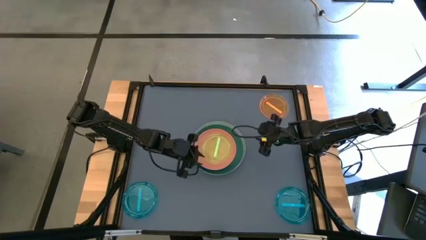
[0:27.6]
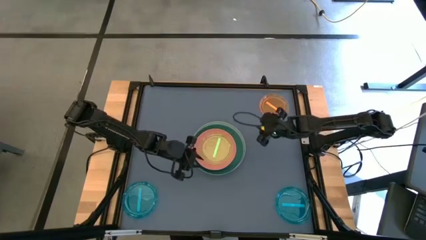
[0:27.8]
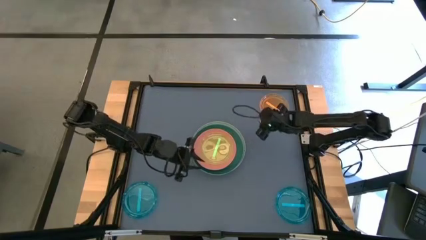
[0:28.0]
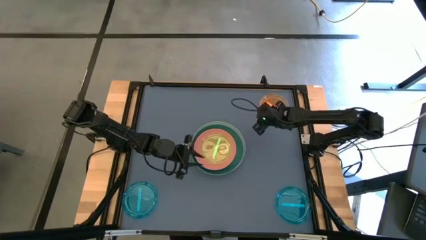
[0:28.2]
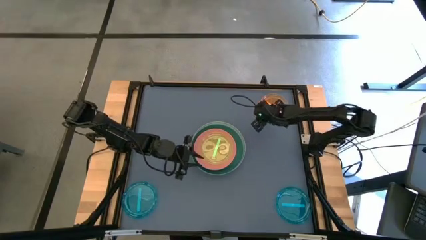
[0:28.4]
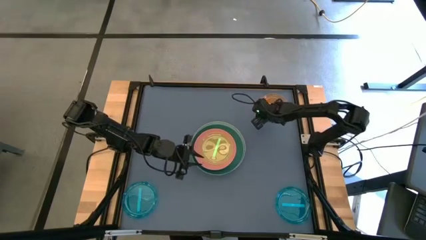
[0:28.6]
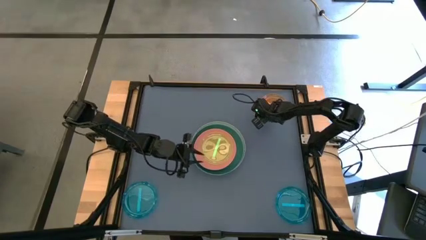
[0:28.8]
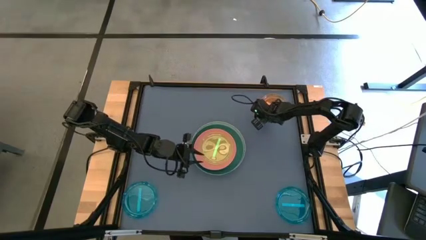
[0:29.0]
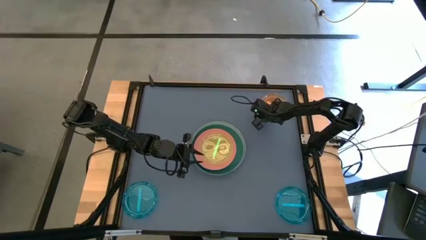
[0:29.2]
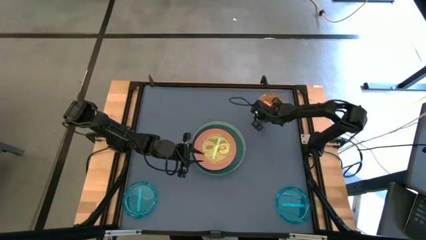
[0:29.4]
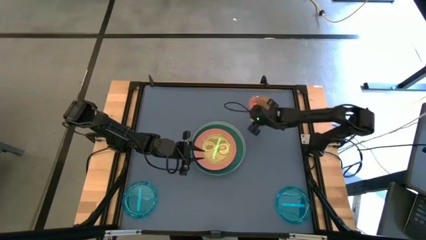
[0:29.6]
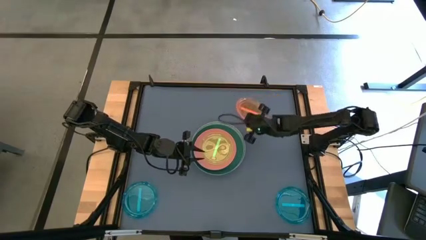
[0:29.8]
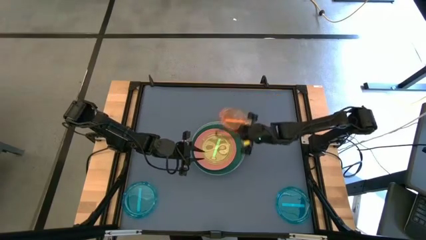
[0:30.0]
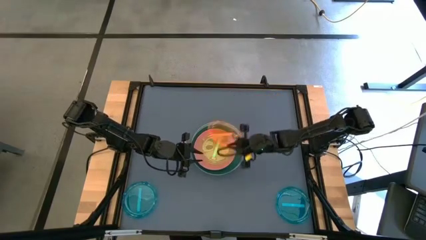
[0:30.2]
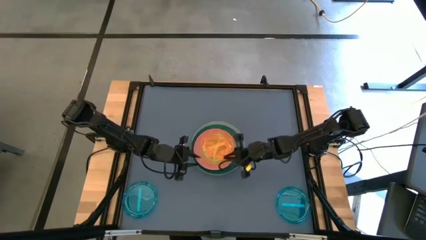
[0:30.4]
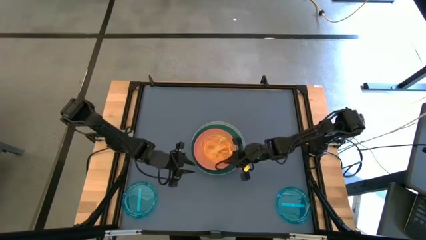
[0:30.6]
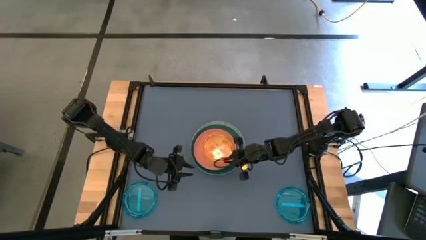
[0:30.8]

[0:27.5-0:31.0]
Task: Stack plastic plates
Stack the orange transparent plate on the green transparent plate

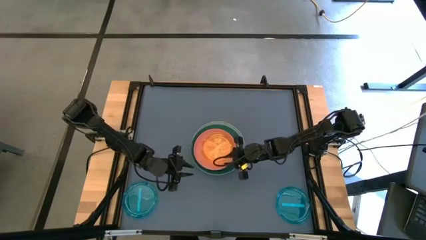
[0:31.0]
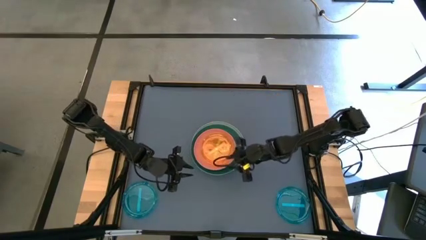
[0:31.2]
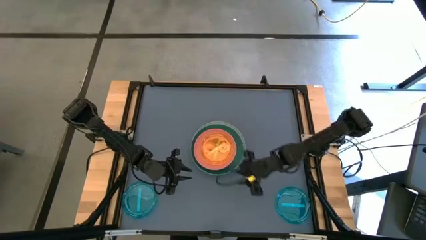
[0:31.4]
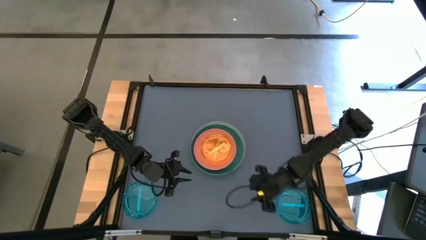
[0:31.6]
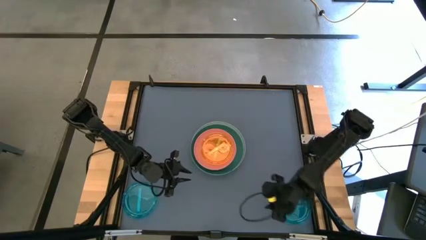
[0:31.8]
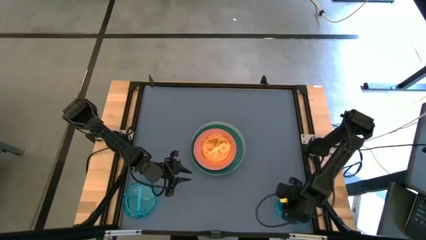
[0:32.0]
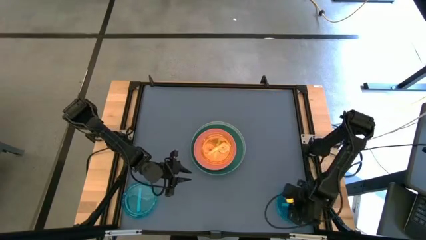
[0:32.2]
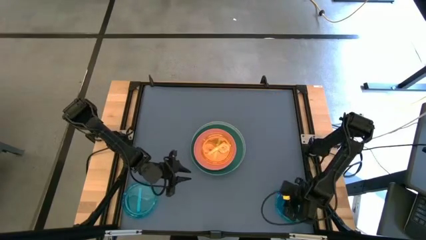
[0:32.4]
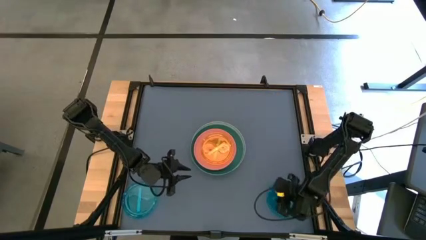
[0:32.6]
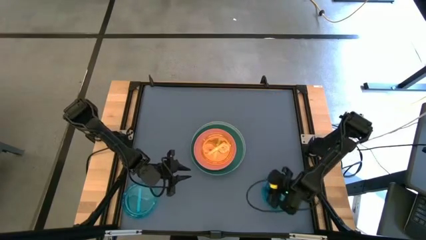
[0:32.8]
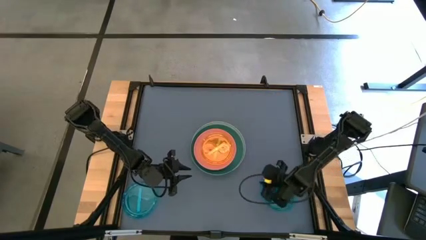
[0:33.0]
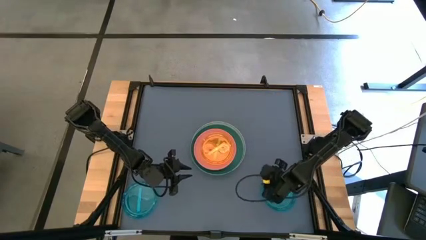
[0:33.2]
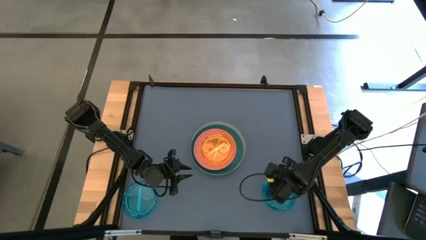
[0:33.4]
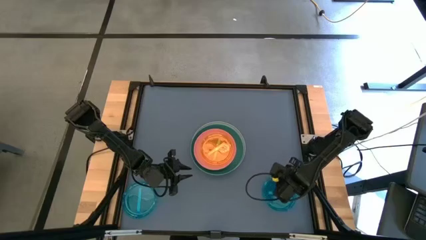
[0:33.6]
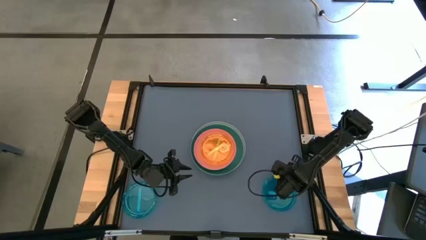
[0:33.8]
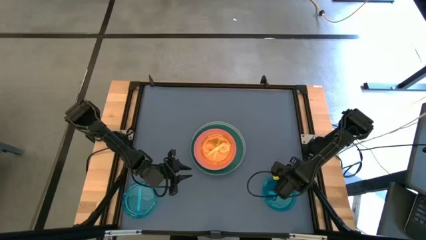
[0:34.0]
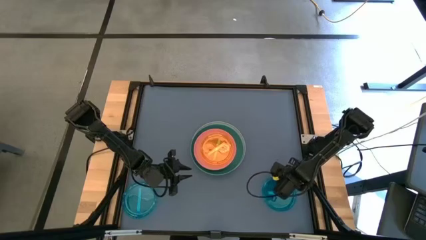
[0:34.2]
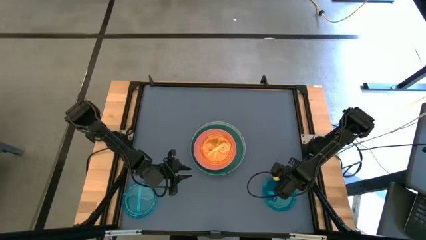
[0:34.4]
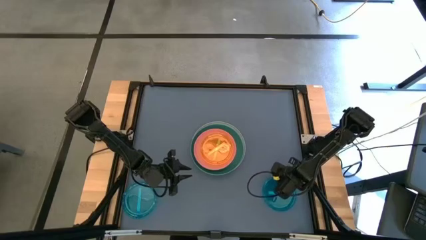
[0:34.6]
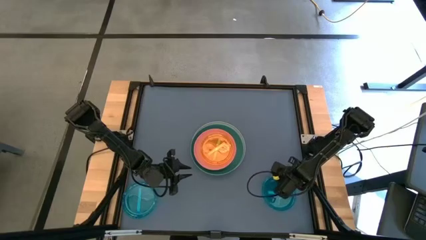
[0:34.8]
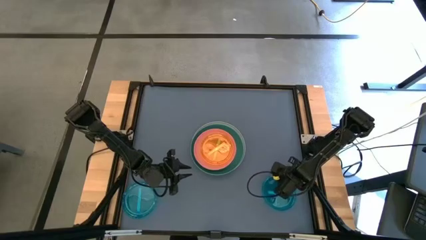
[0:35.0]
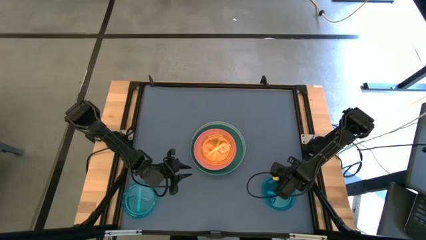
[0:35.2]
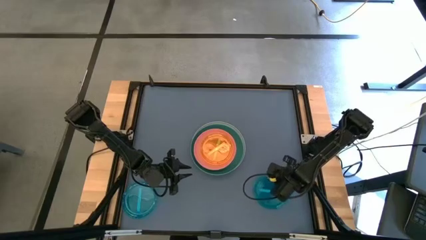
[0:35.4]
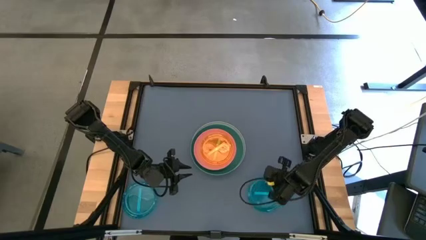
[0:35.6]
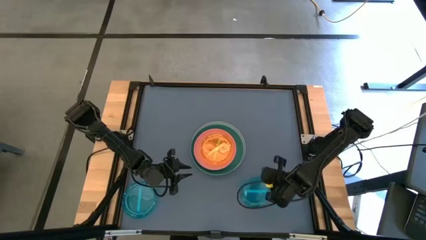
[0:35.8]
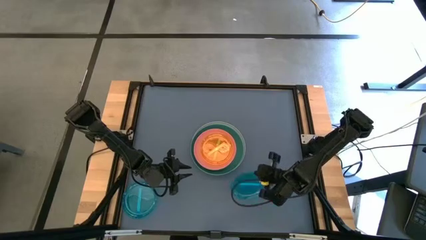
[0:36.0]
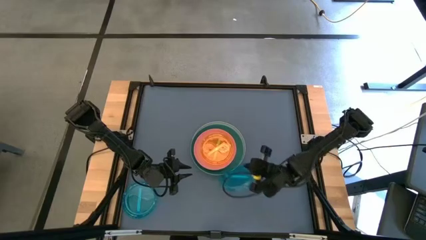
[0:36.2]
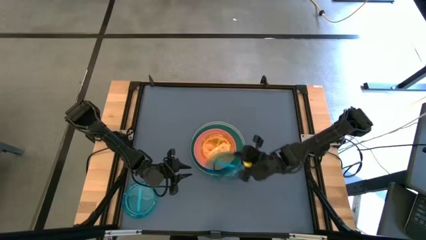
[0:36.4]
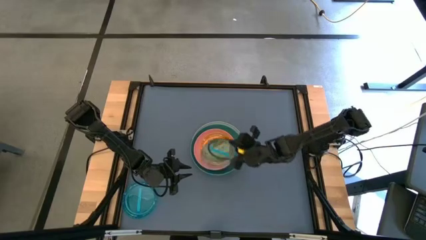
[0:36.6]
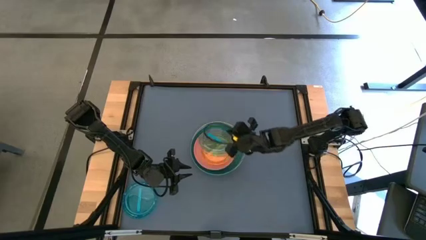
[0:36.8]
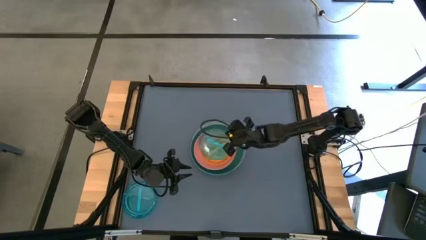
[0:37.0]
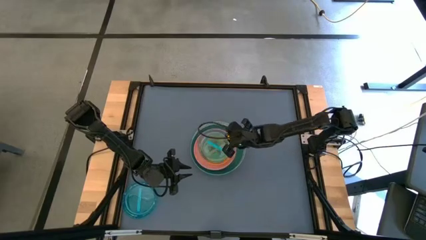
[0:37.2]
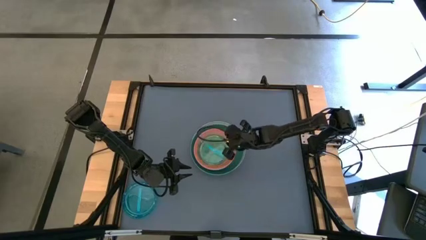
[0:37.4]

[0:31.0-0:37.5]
Stack the right blue transparent plate on the orange transparent plate

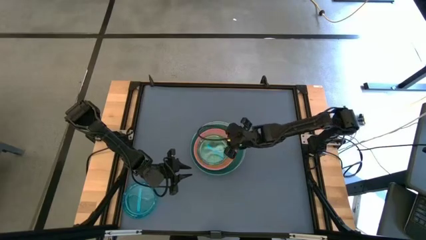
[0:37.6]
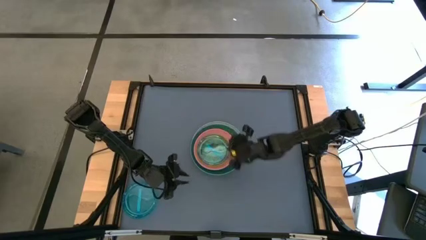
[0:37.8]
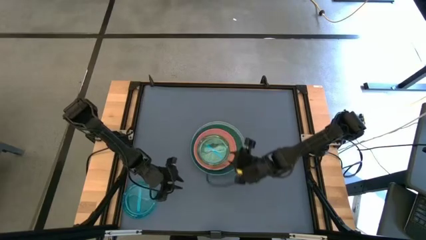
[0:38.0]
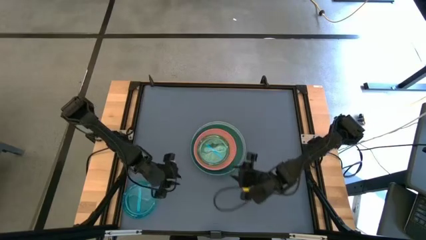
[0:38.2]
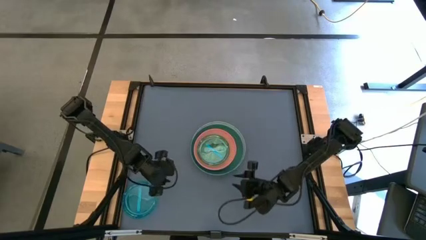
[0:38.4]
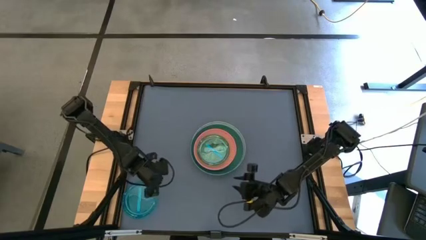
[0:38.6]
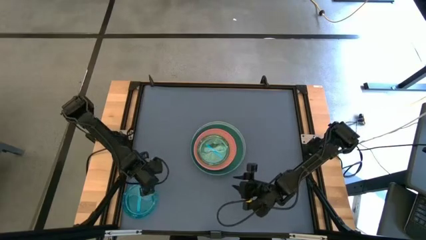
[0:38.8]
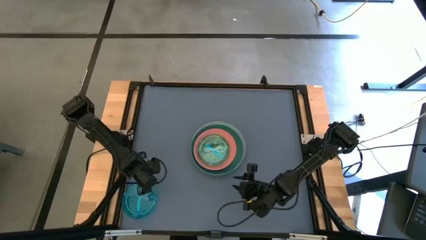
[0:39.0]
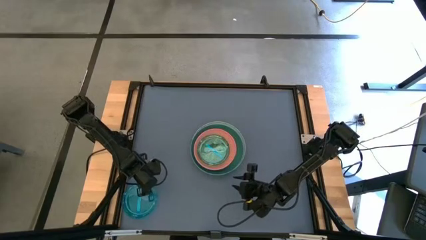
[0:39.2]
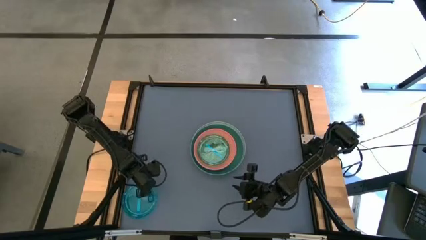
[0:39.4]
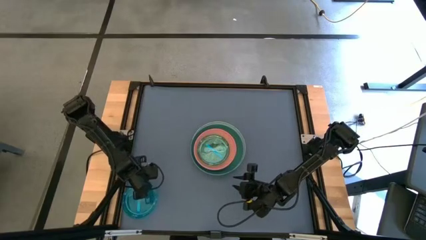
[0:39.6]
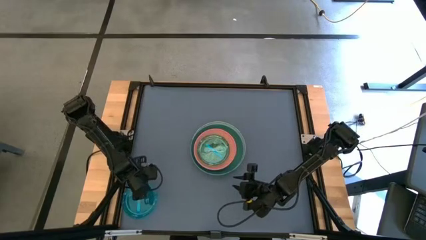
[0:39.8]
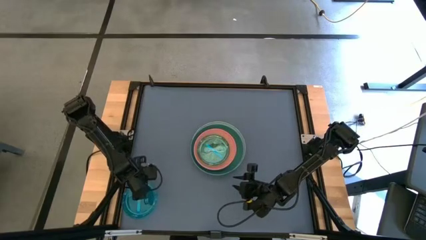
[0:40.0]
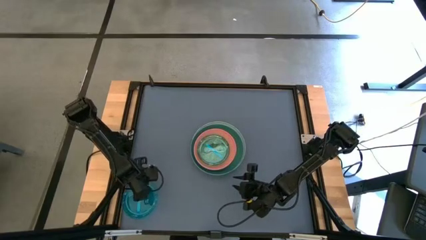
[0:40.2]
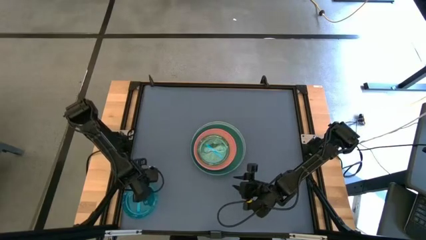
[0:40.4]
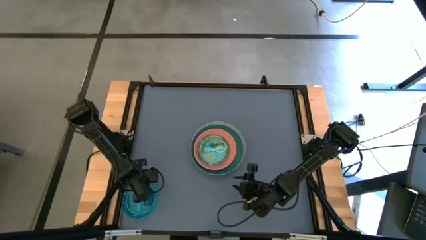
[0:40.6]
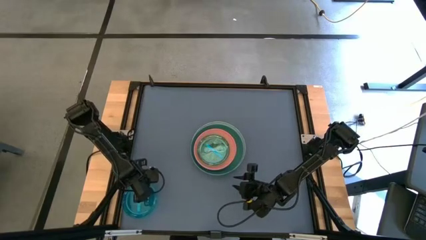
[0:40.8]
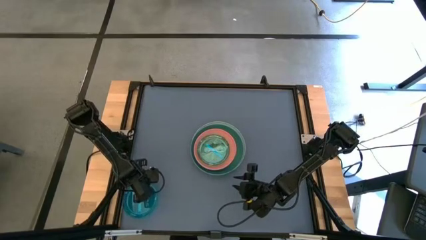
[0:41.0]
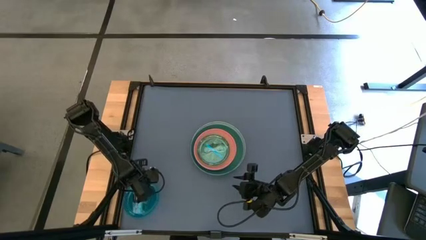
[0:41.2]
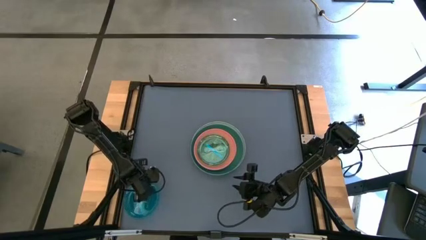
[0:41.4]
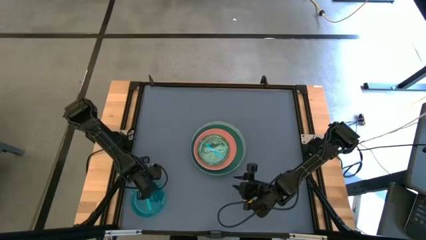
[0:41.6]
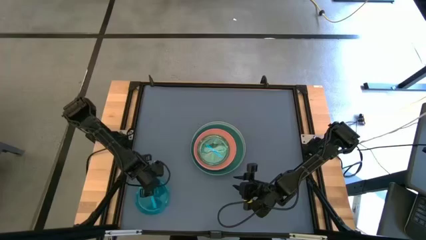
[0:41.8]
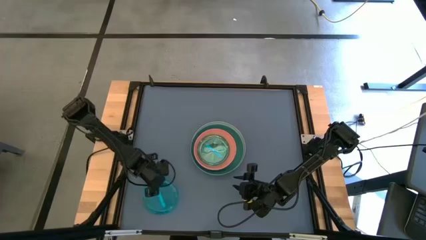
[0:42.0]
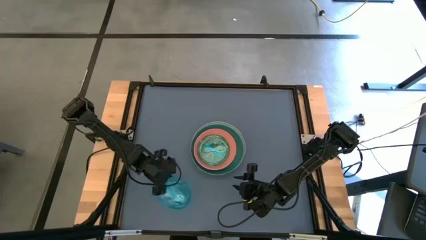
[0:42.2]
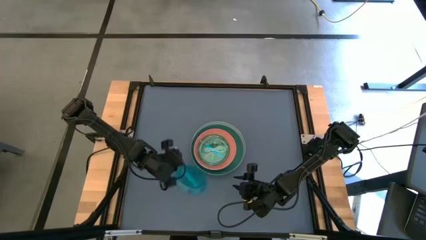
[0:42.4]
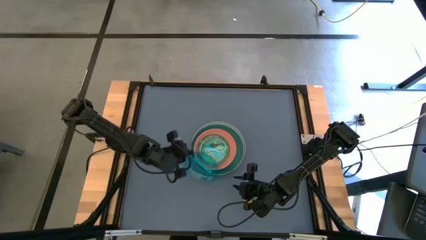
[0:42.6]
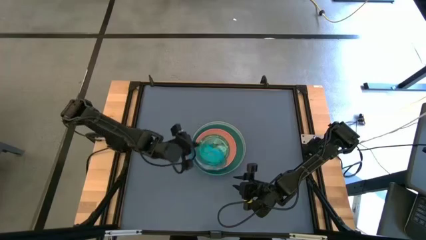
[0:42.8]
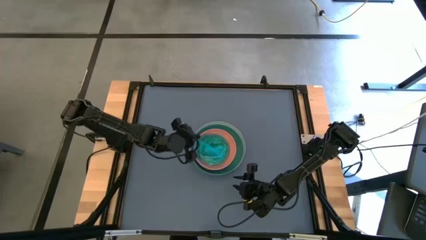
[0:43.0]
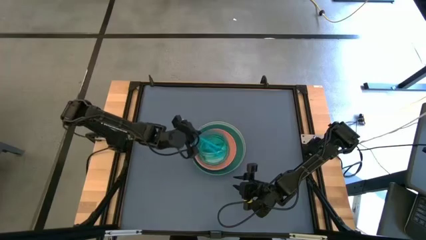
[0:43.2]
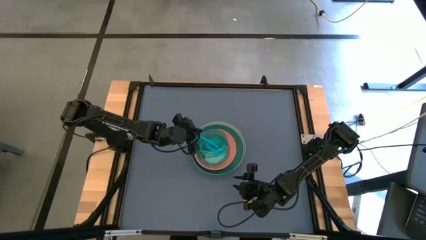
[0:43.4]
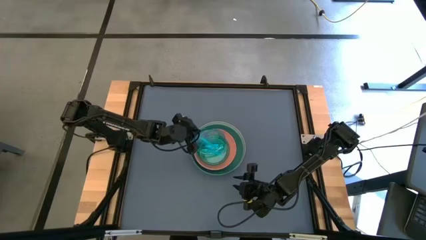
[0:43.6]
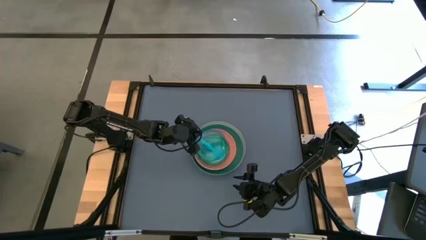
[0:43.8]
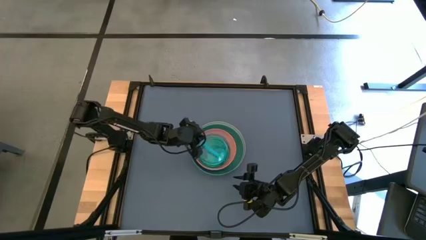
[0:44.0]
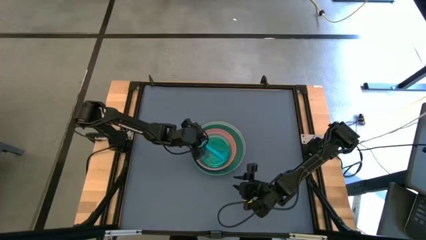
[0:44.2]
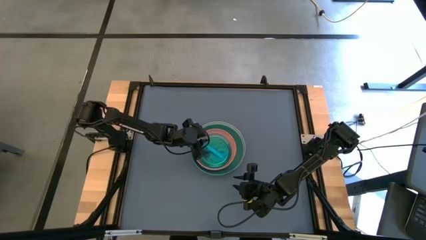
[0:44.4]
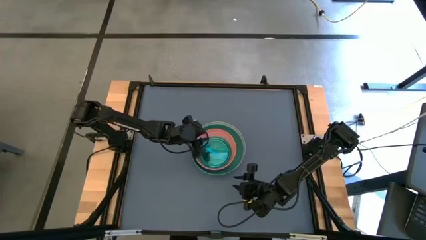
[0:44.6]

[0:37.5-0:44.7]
Stack the blue transparent plate on the orange transparent plate
